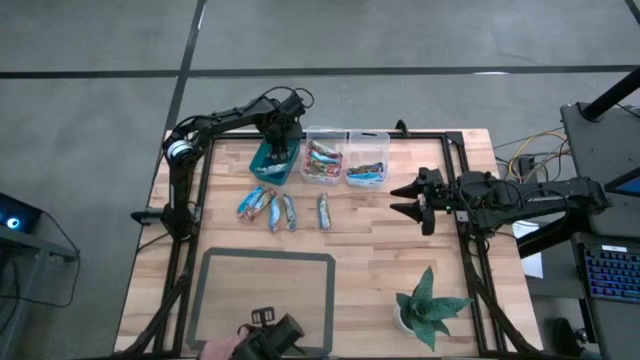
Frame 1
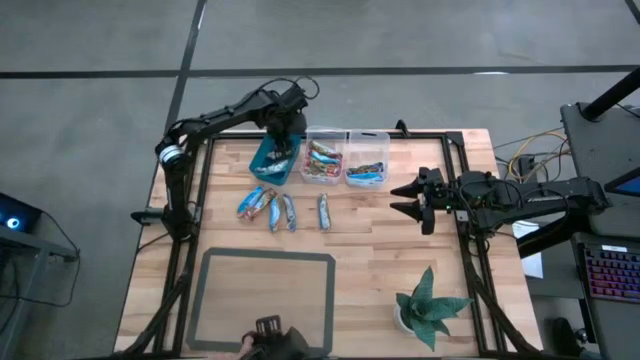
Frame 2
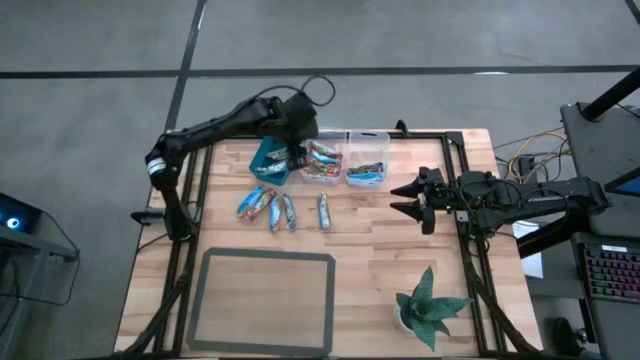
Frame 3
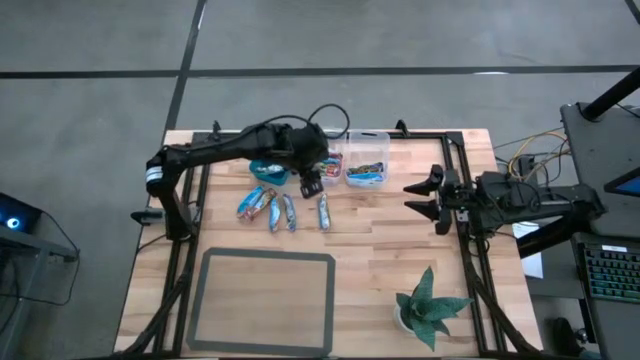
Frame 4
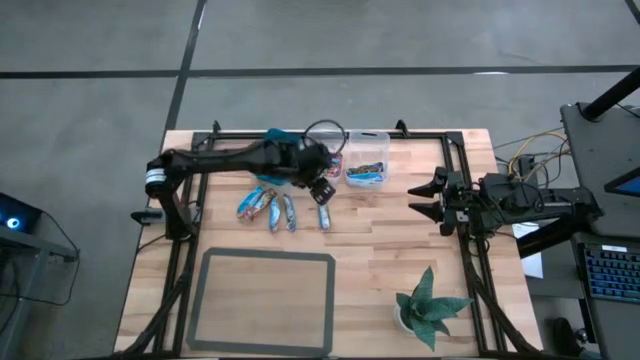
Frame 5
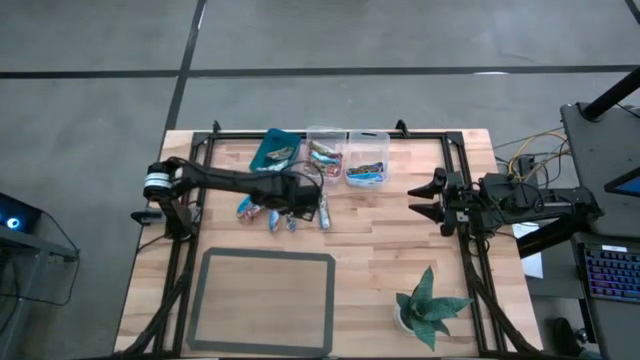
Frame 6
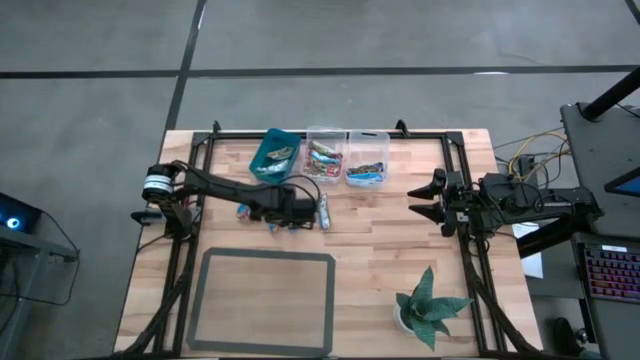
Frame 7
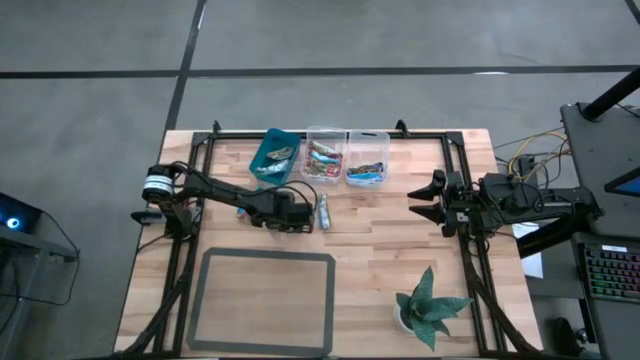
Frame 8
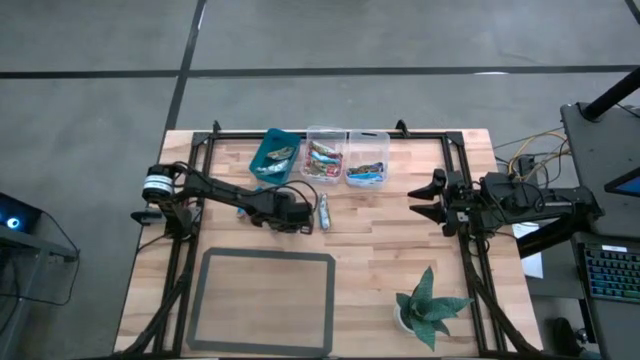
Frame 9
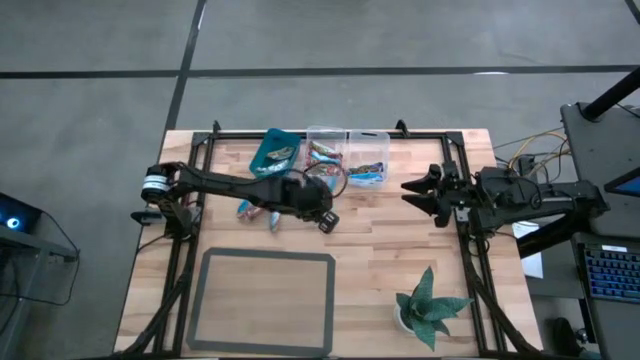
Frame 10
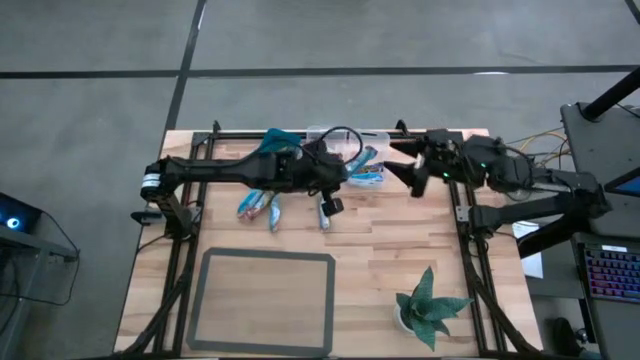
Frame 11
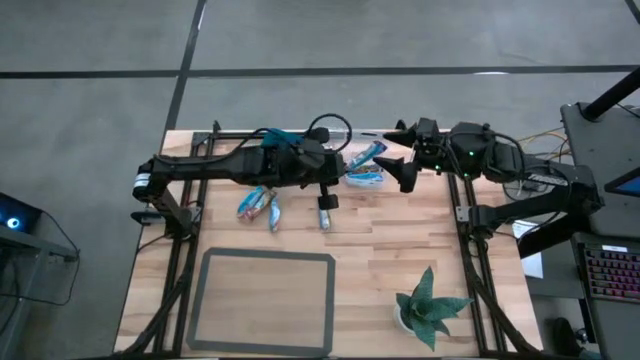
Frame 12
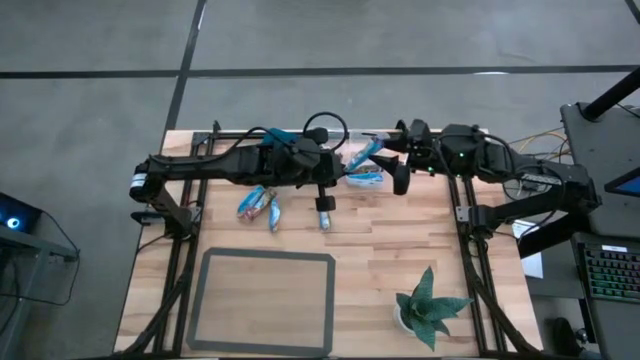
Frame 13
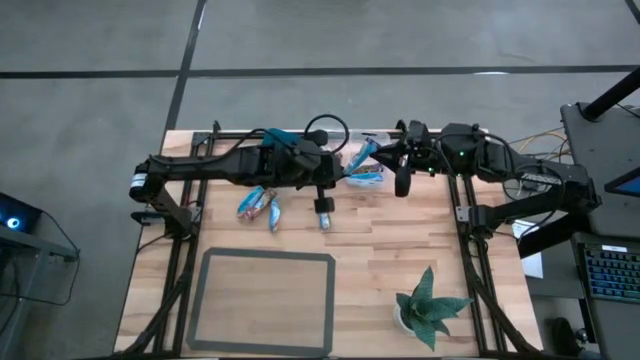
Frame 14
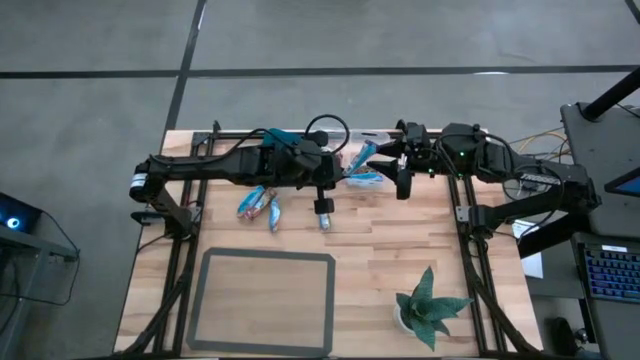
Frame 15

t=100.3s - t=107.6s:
Task: Pick and place Granola Bars by type
Put the blue granola bar into the right transparent bin

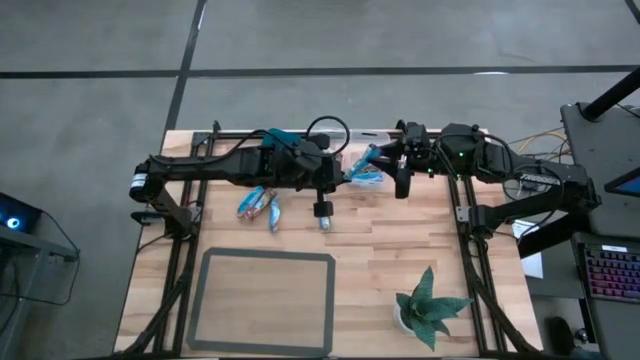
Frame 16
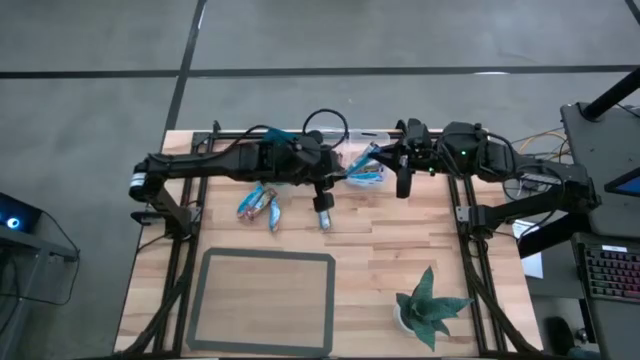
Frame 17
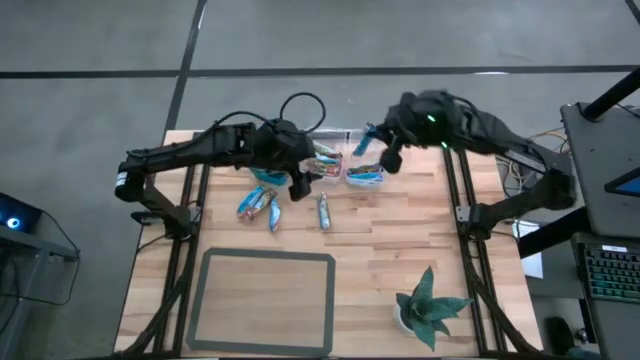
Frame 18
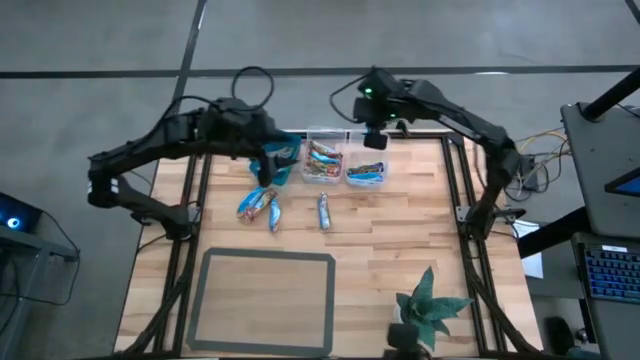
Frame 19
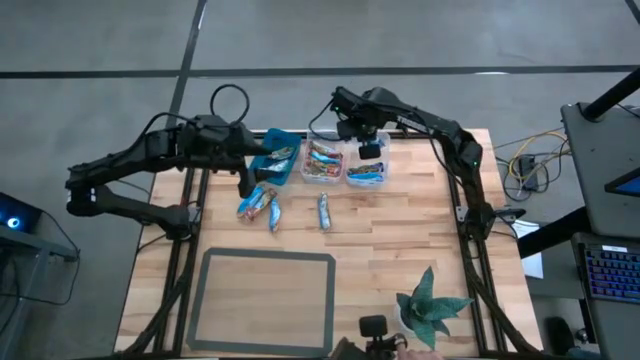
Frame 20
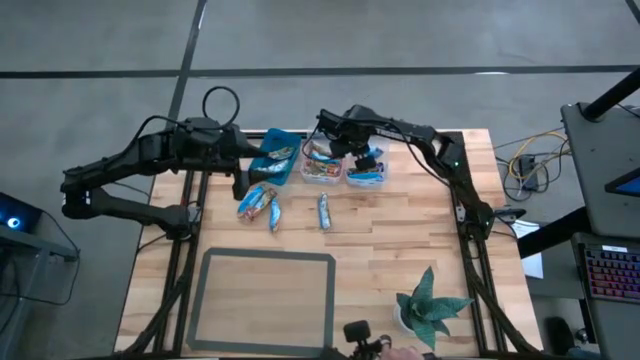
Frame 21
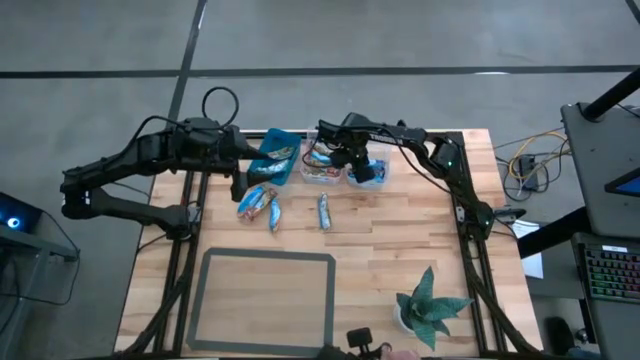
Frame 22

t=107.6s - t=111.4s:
Put the blue granola bar into the right transparent bin

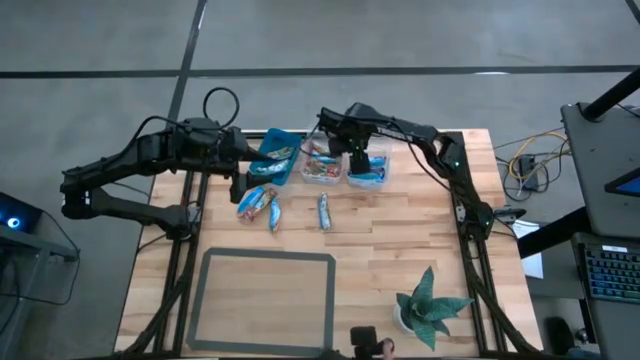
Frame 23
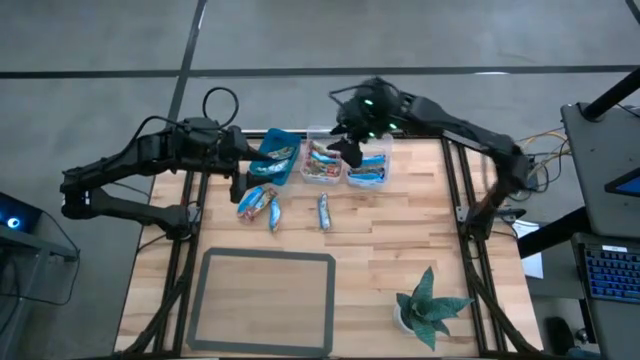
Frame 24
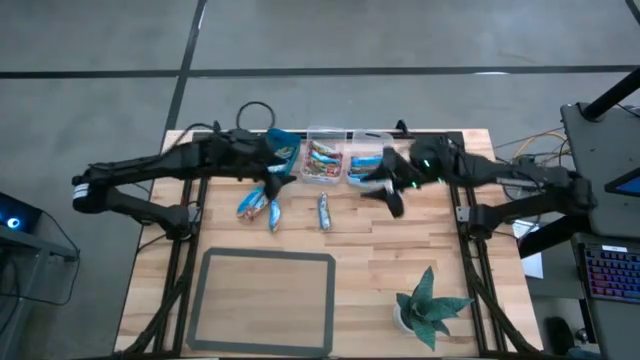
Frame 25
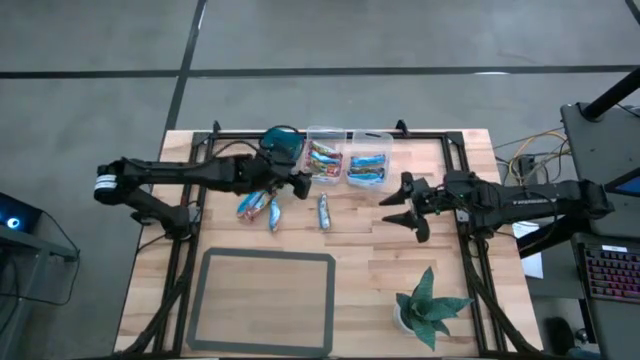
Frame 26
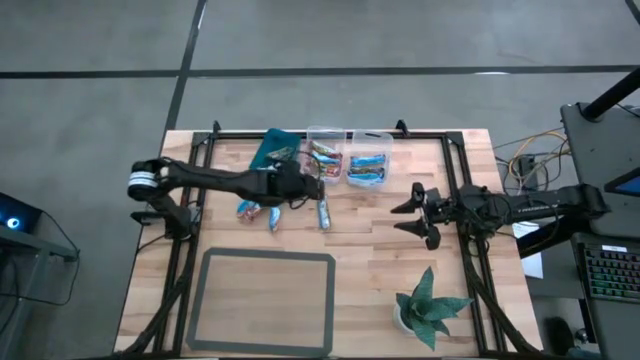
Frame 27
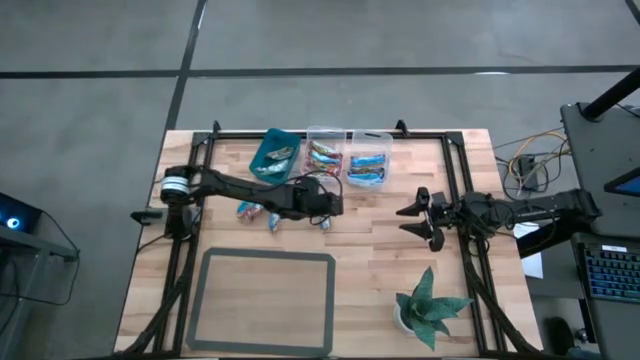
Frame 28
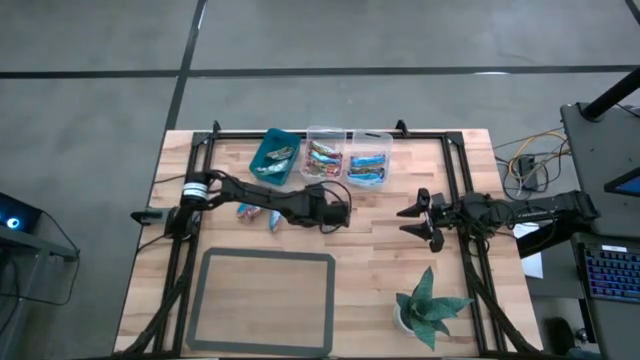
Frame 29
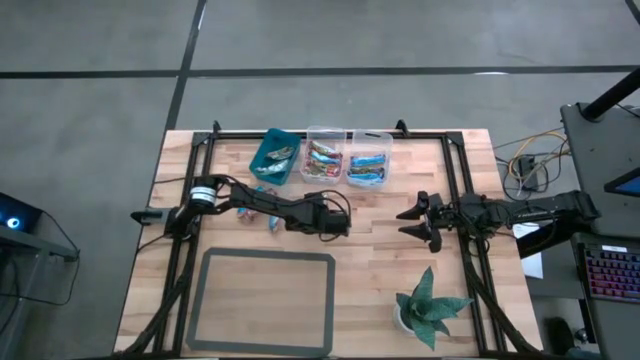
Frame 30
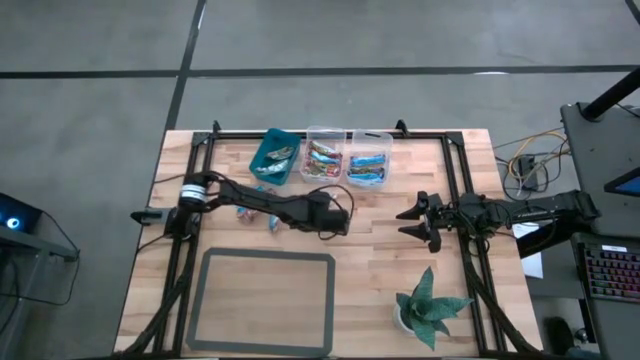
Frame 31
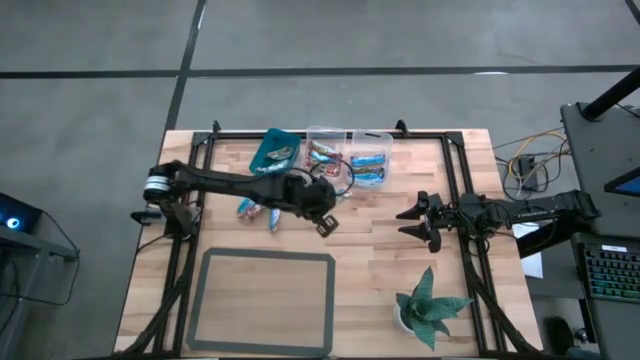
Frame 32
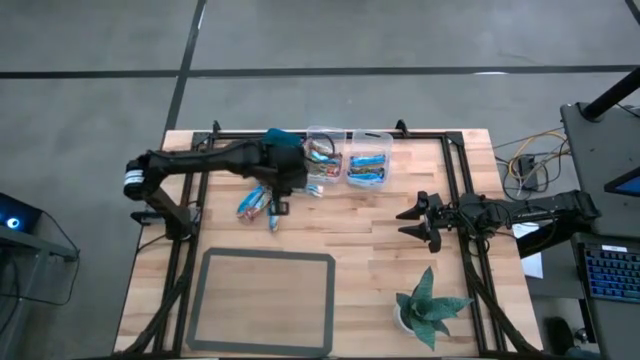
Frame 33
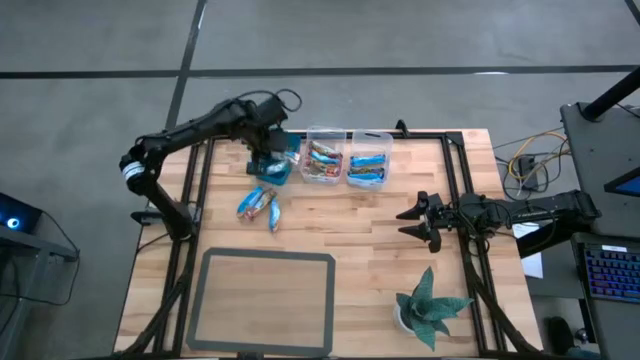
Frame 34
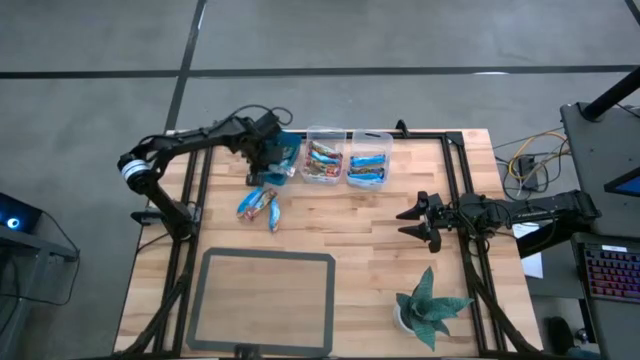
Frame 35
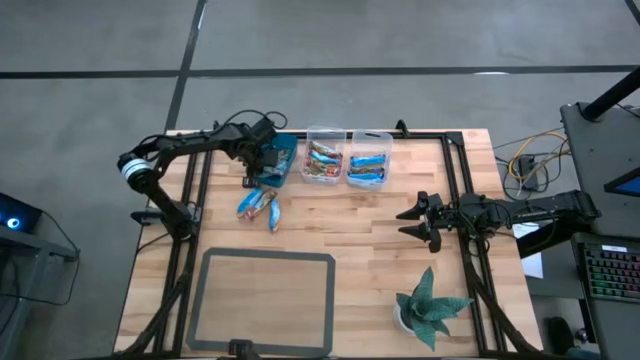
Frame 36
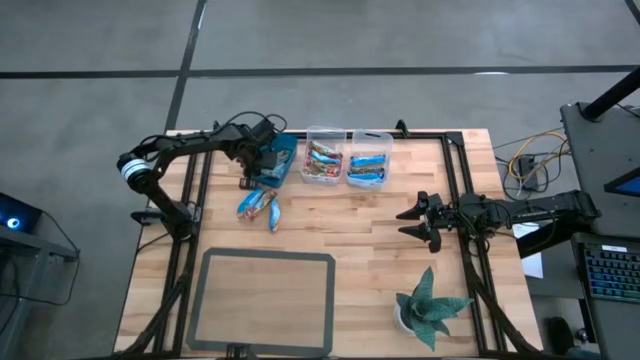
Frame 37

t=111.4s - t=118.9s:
Put the yellow granola bar into the blue bin

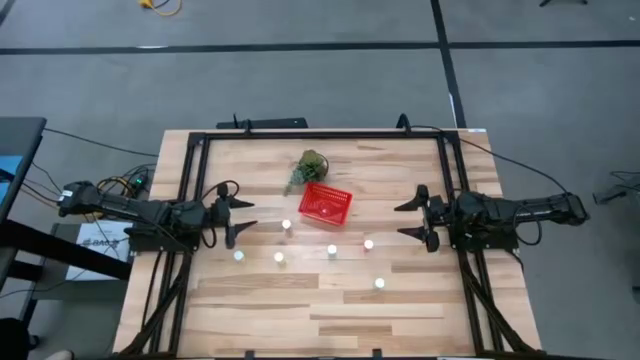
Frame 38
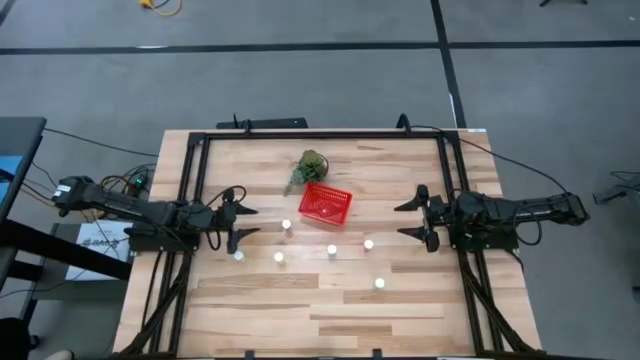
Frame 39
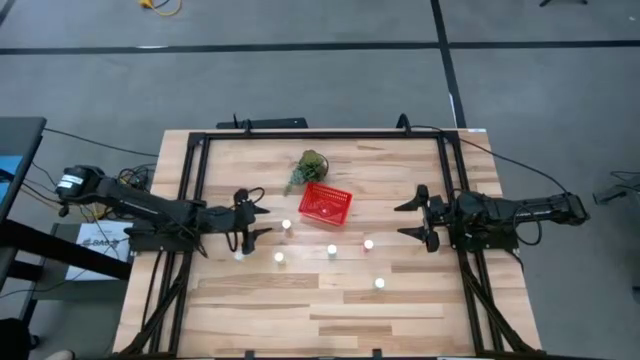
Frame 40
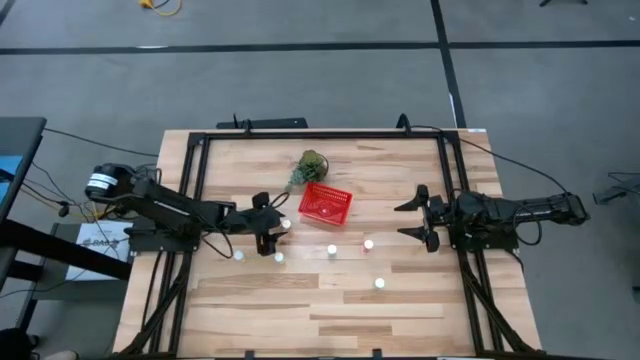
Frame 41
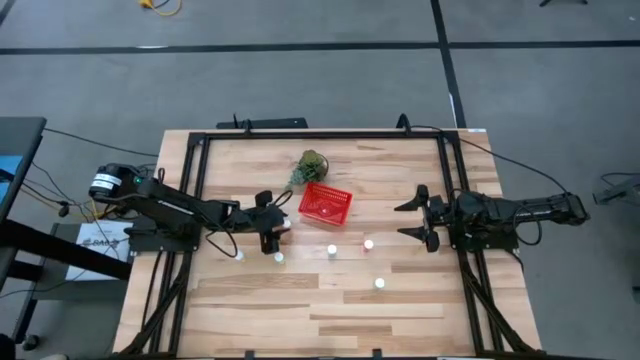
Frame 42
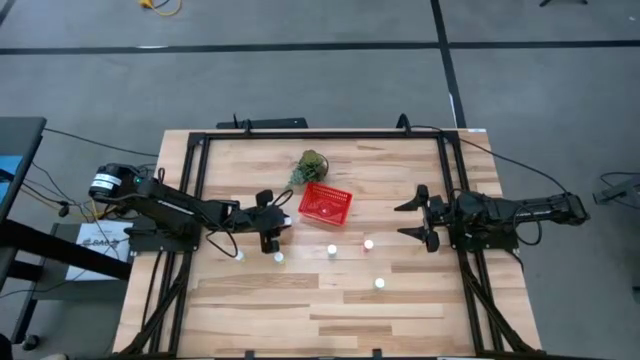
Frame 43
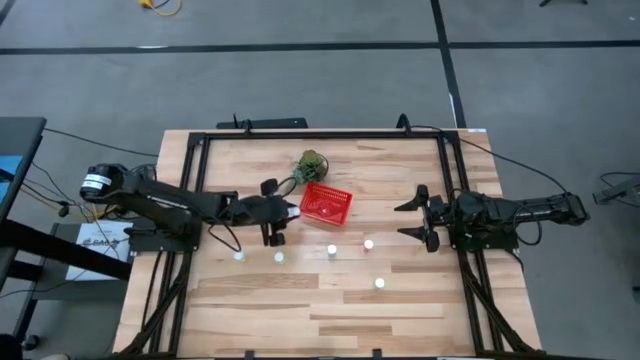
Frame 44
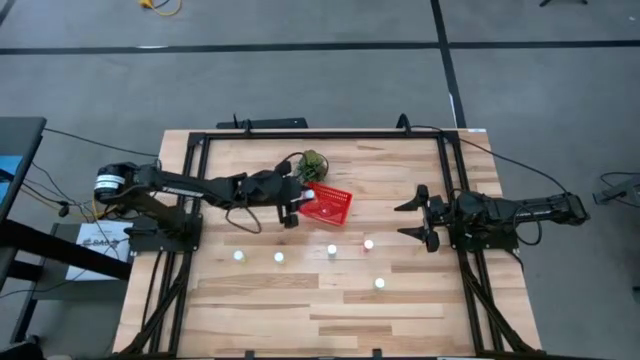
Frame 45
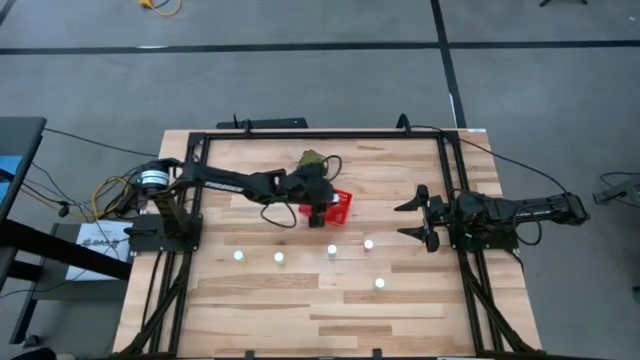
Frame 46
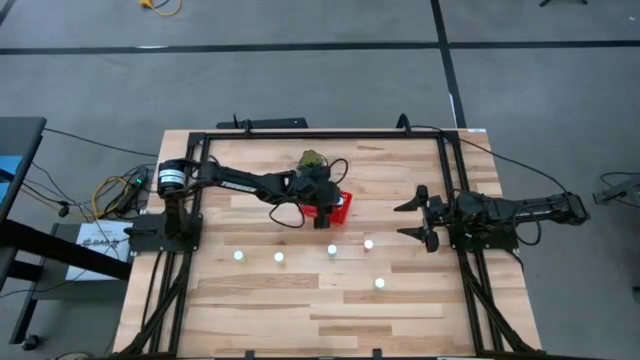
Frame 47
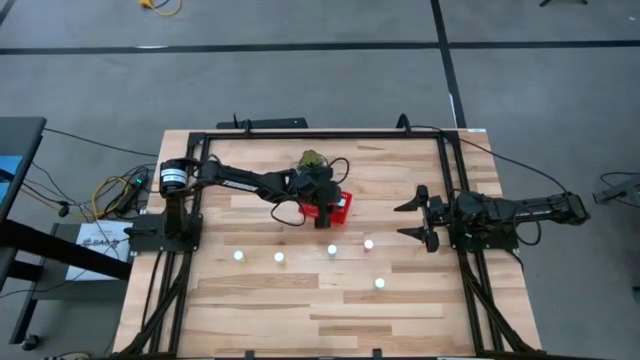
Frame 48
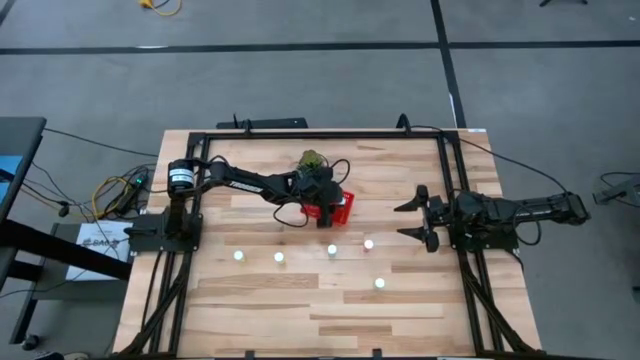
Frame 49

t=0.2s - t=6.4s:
Task: Pick and place pill bottles into a basket
Put the top yellow medicine bottle into the red bin
